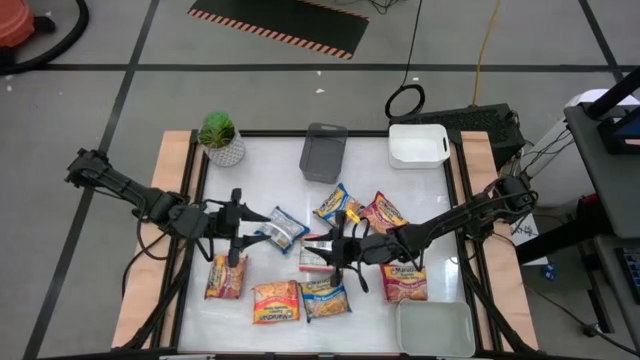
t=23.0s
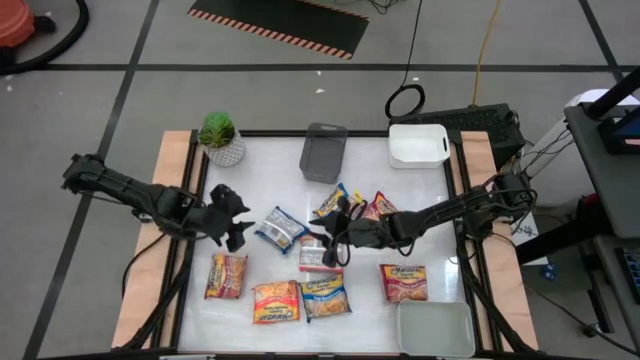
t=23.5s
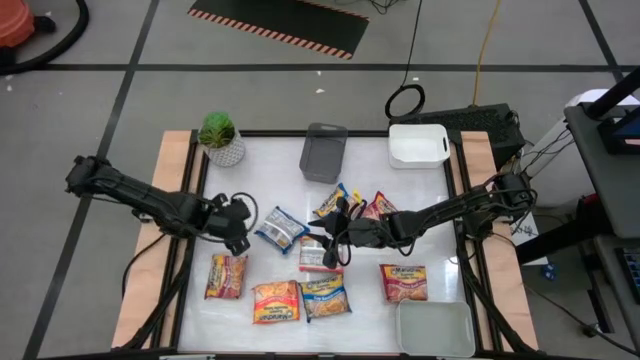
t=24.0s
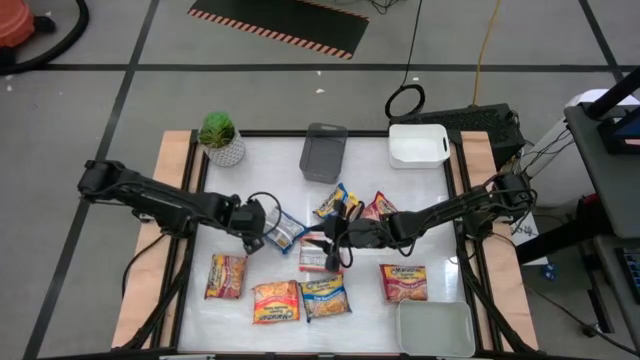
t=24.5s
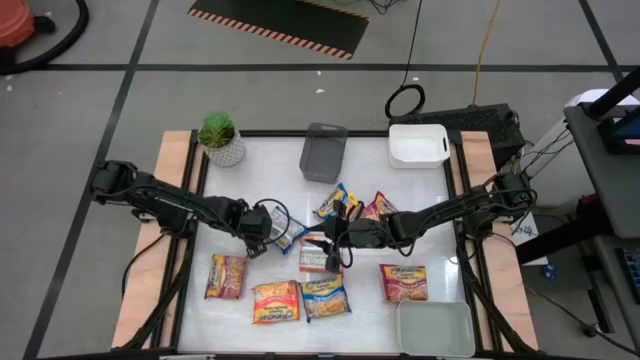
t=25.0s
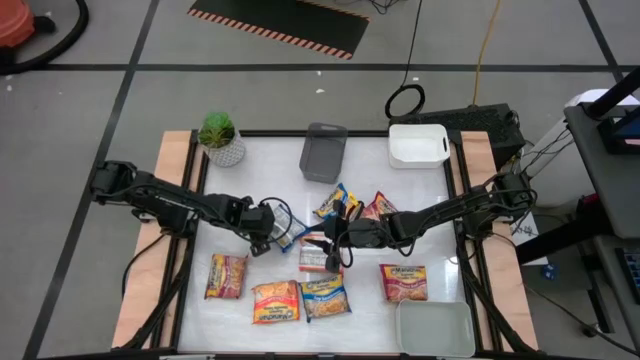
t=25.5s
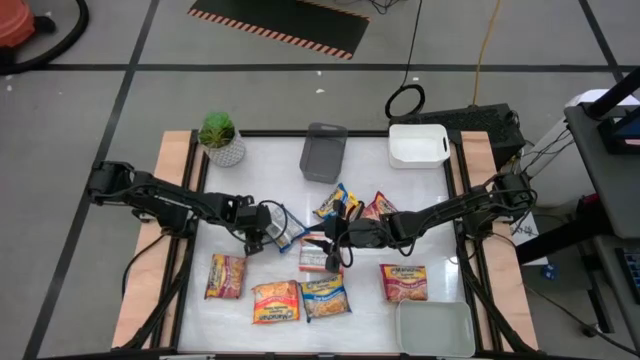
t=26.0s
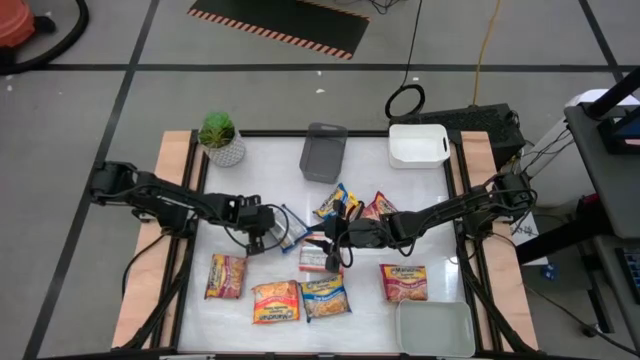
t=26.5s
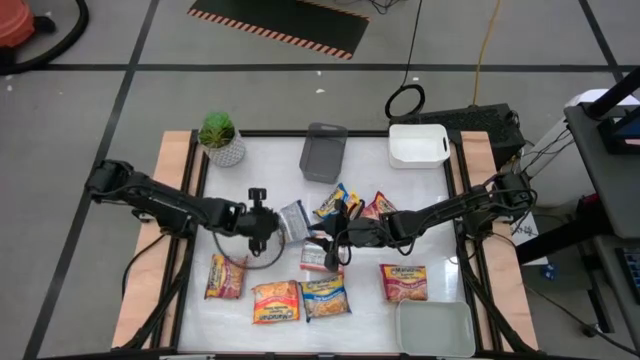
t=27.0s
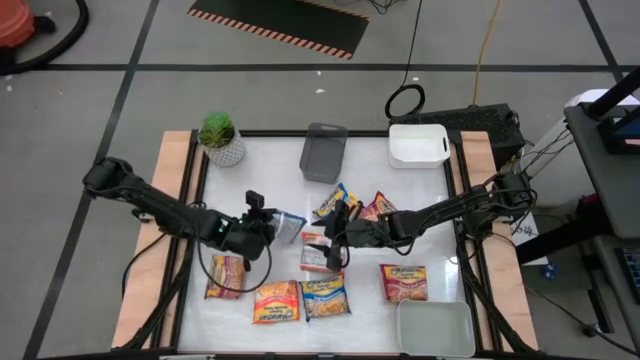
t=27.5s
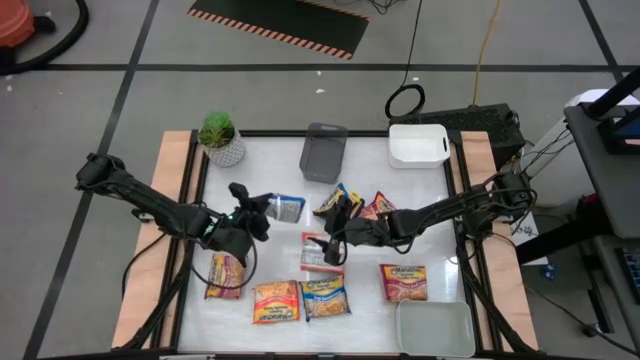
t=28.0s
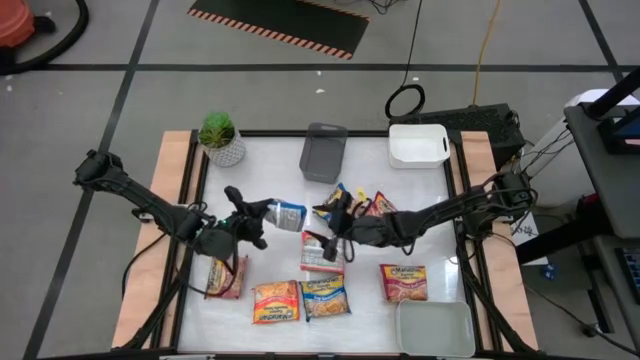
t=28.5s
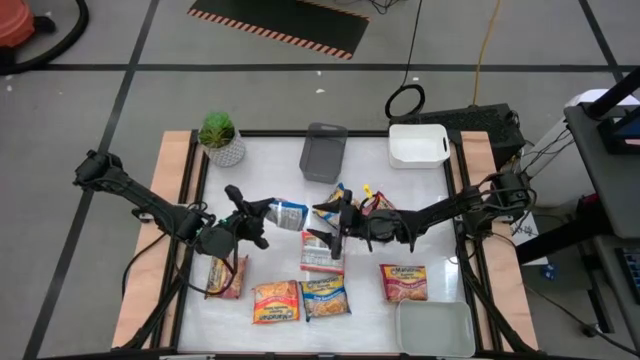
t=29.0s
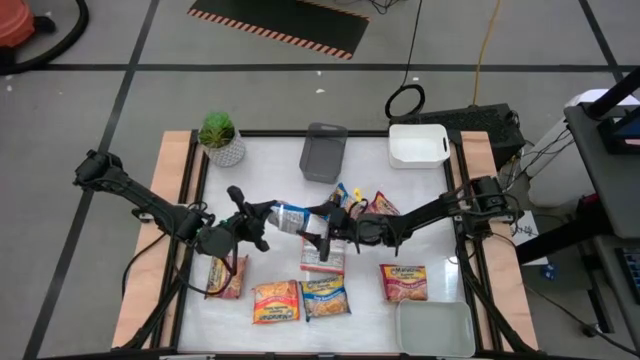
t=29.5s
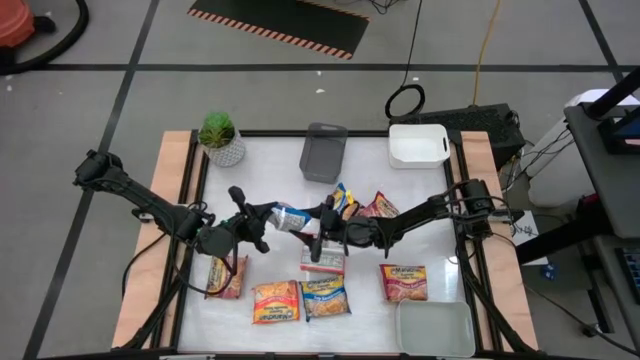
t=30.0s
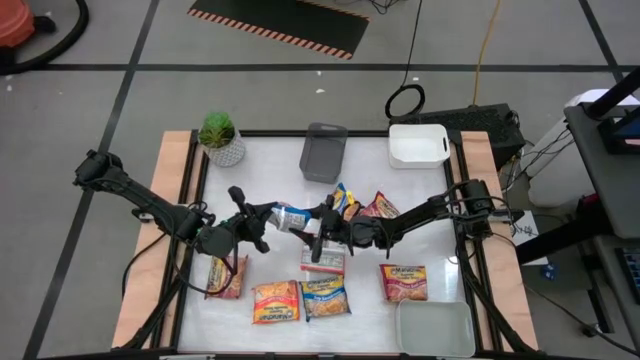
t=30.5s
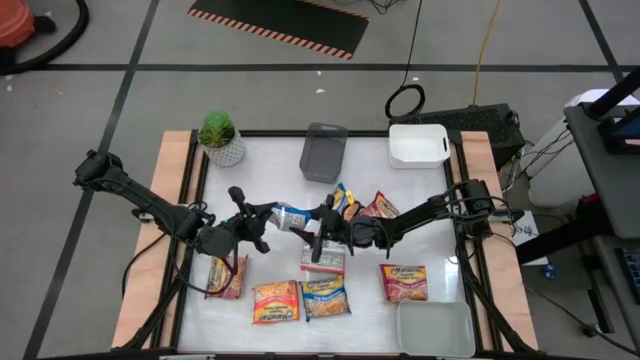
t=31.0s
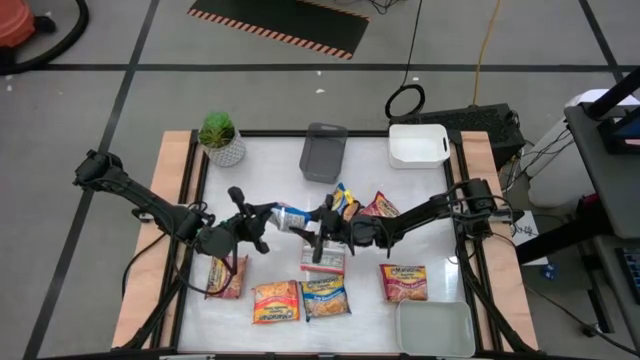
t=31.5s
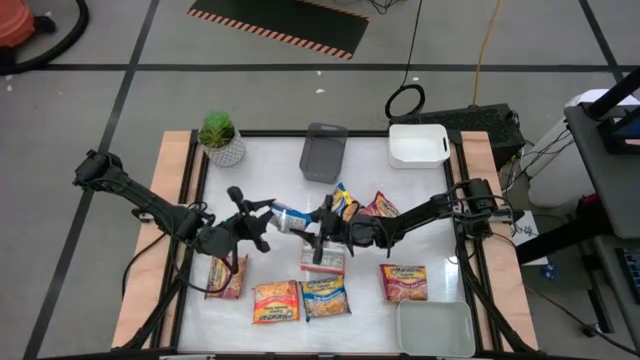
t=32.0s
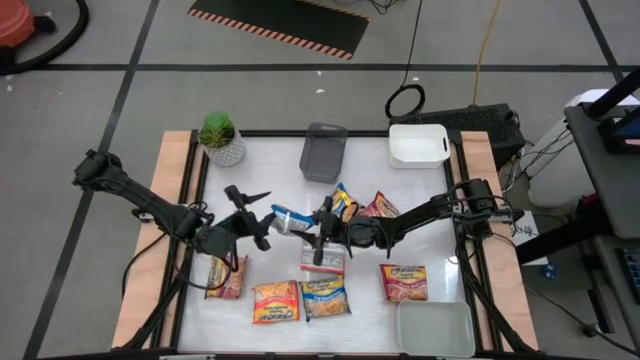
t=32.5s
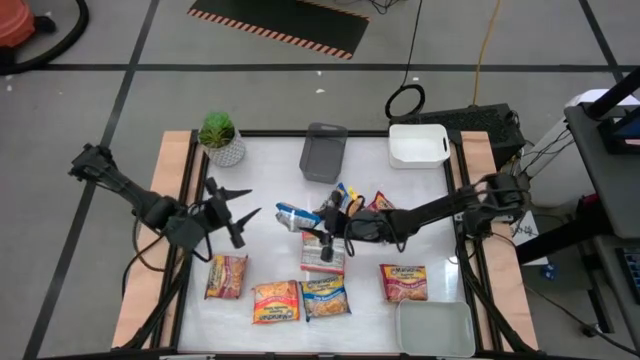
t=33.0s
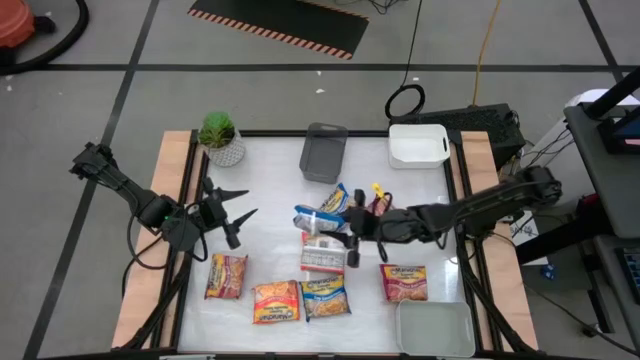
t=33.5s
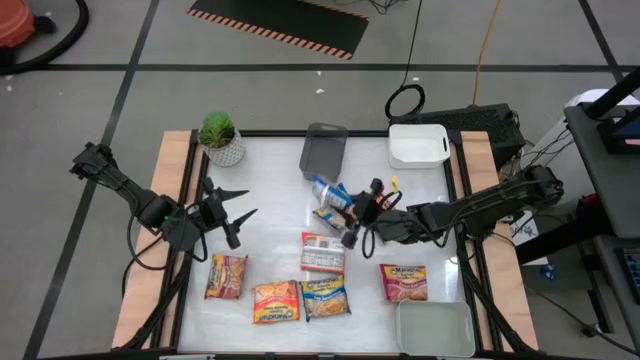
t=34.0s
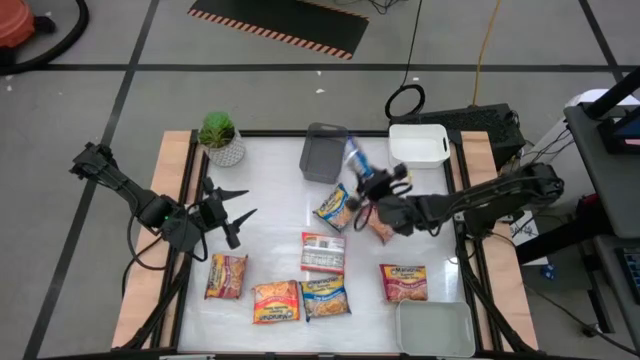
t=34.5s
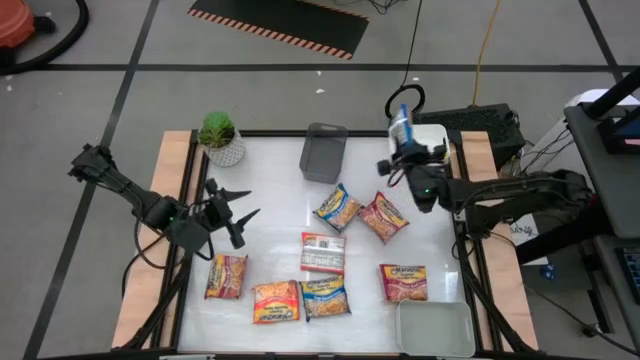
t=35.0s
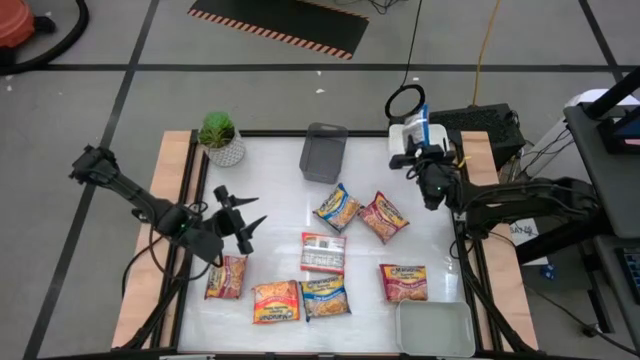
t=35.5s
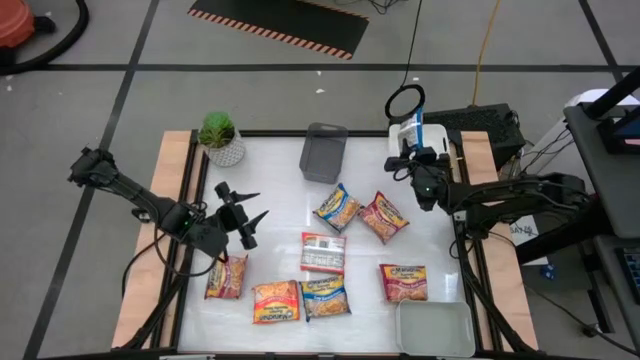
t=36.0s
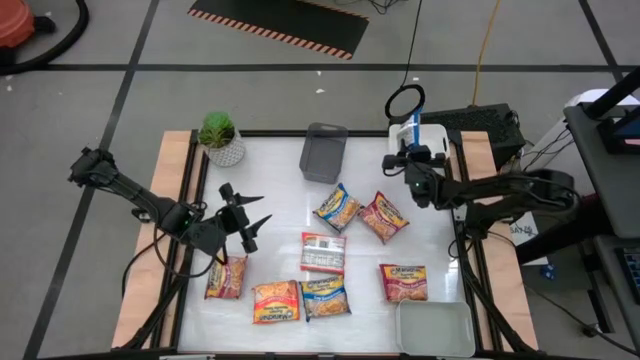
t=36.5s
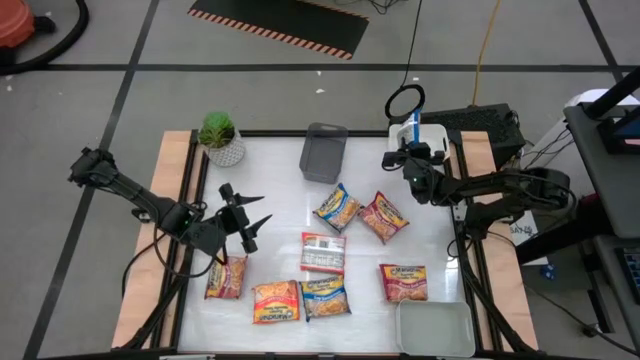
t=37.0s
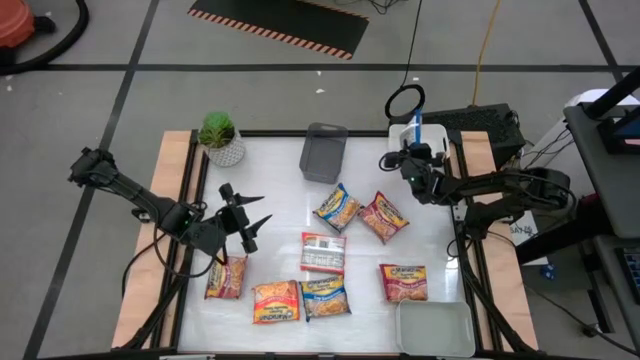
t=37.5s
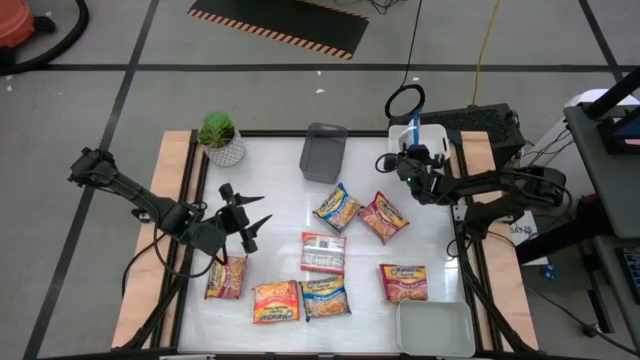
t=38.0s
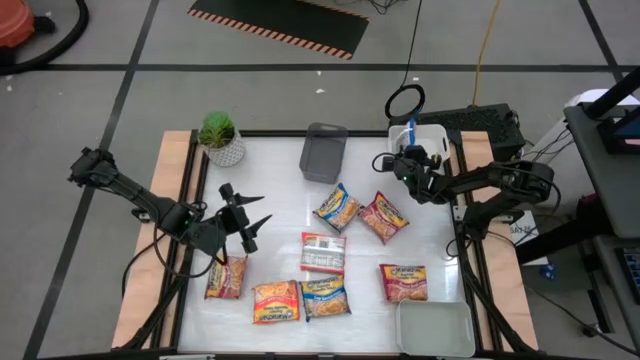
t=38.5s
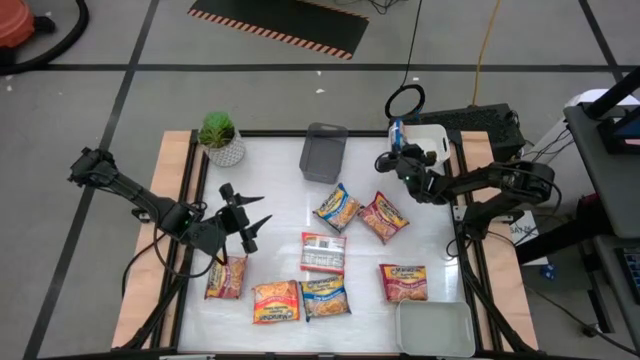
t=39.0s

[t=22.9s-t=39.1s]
Task: Sort Maruchan noodles
Put the top left blue noodle pack into the white bin

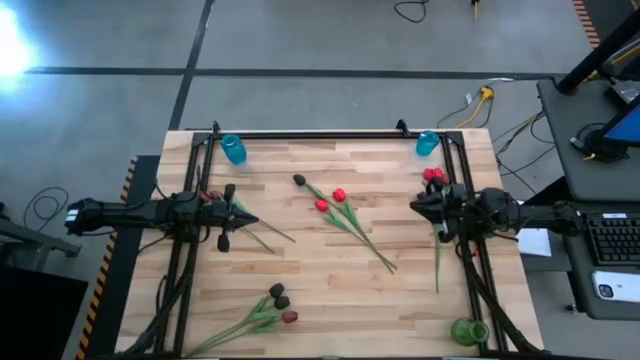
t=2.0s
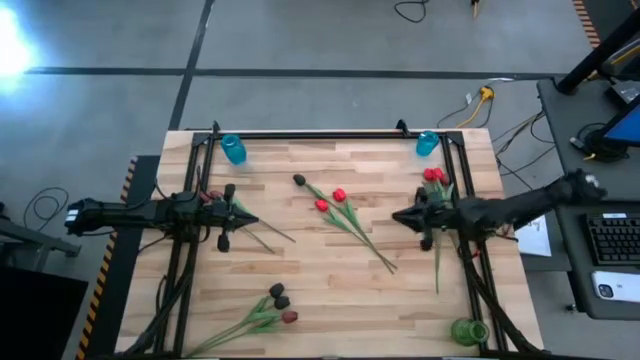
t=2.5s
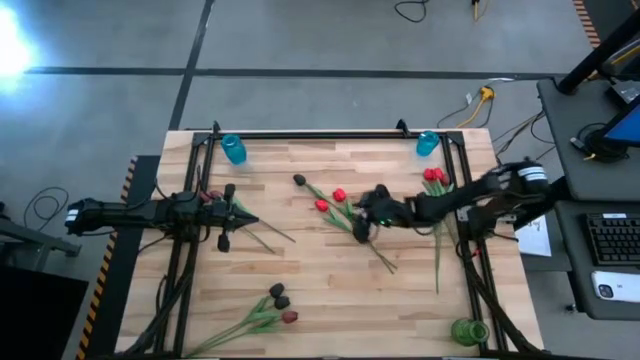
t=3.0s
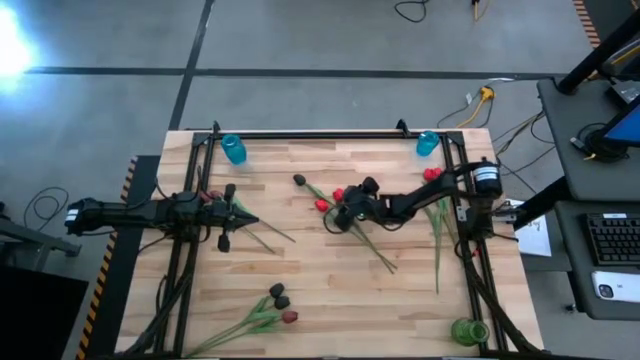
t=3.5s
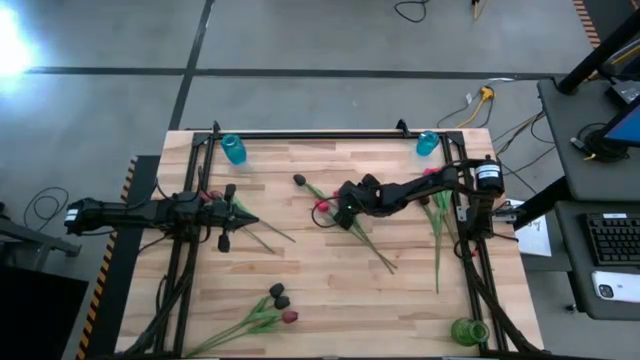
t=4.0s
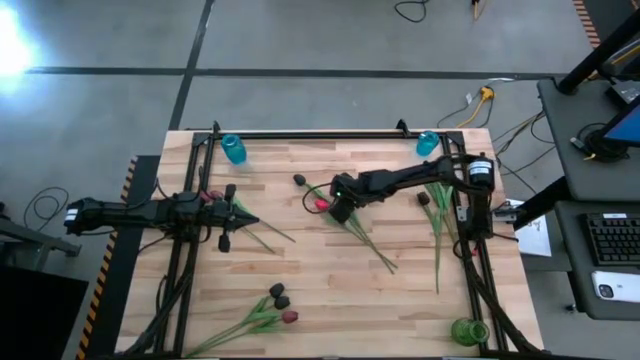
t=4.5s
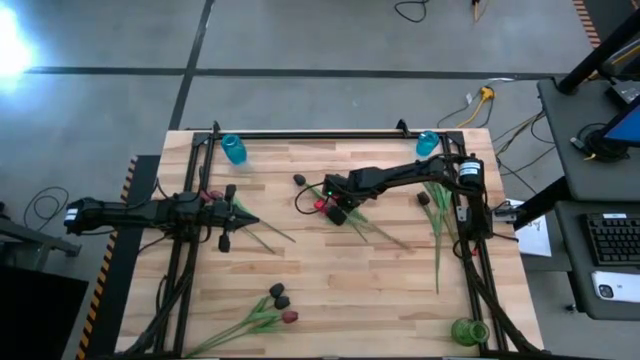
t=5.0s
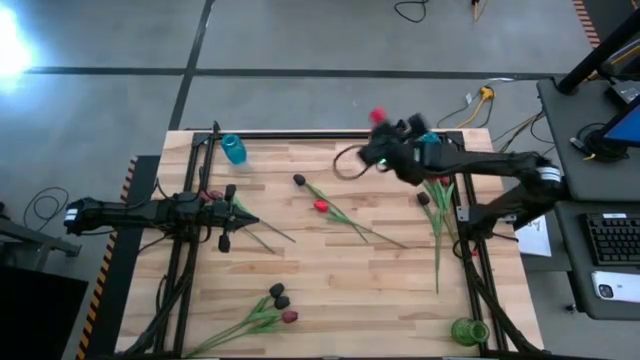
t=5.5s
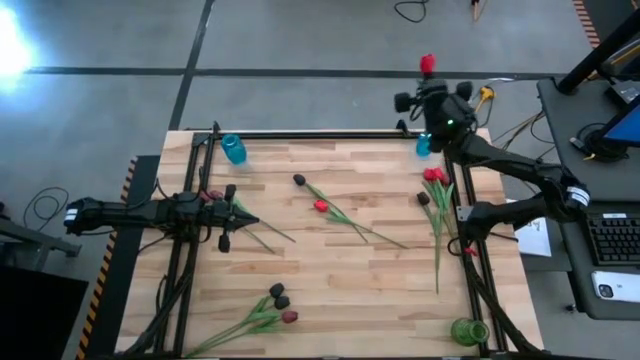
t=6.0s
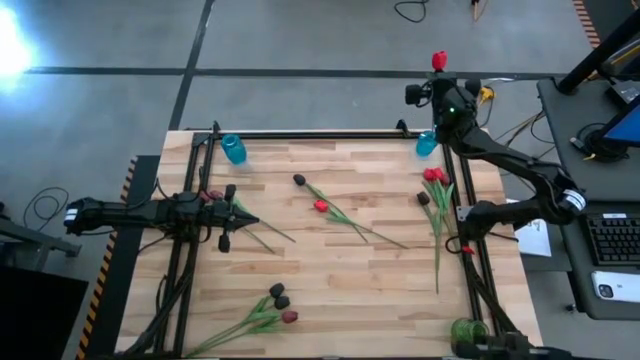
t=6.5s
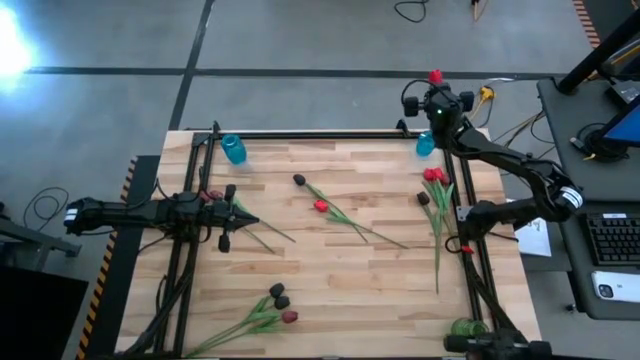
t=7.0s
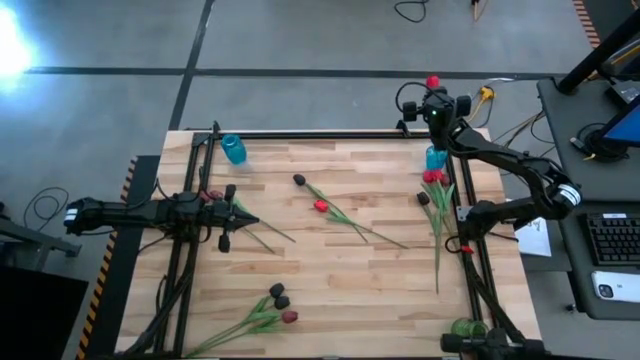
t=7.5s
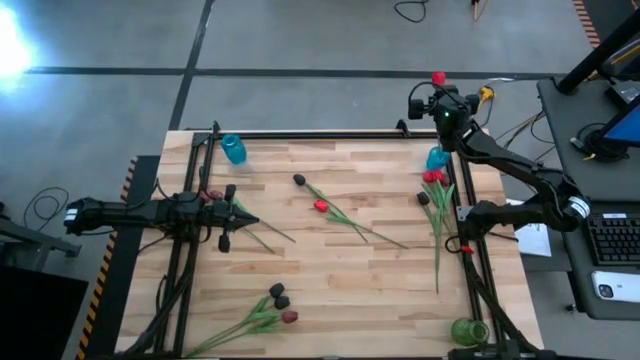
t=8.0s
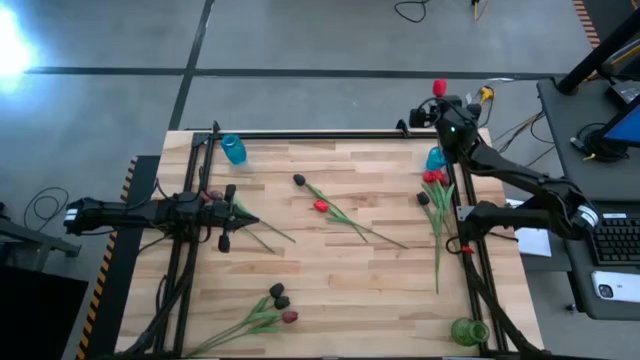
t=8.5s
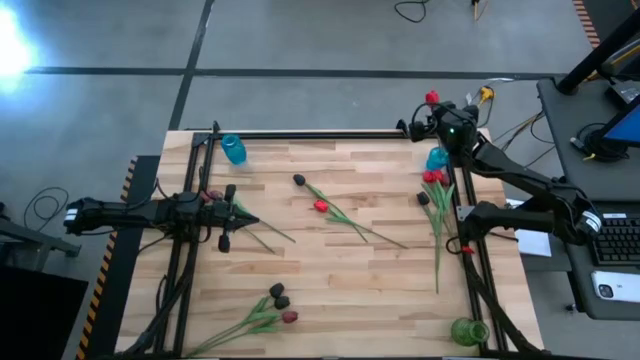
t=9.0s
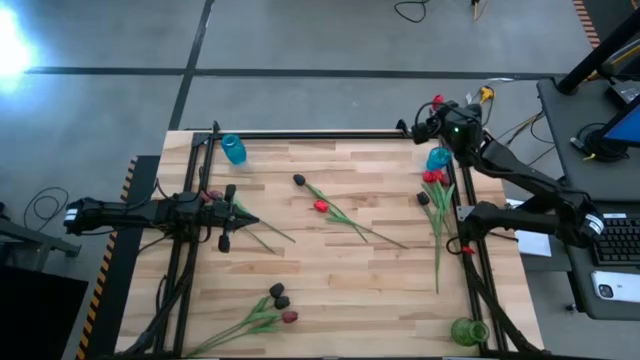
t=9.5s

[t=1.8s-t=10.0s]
Task: Sort flowers into vase by color
Put the red tulip into the right blue vase
